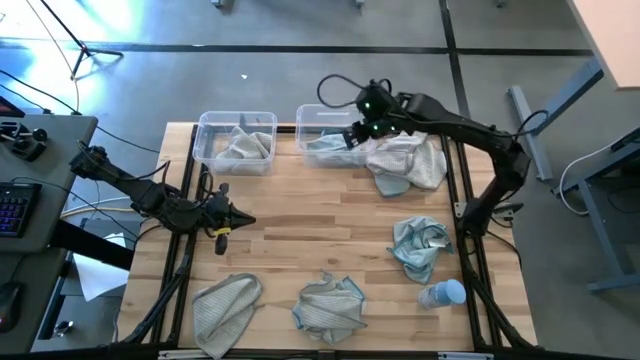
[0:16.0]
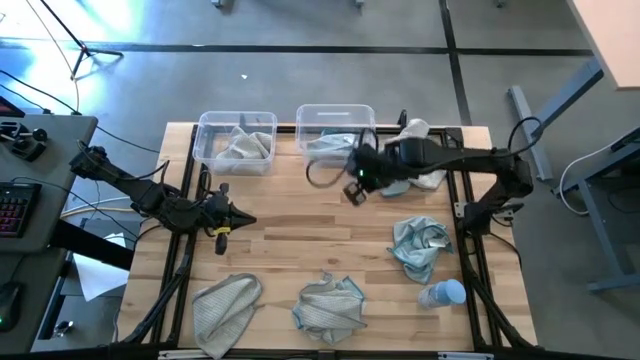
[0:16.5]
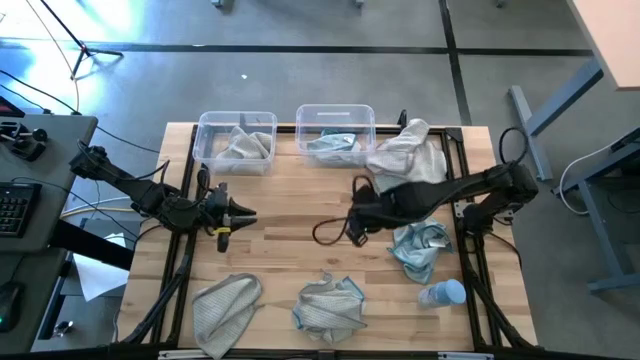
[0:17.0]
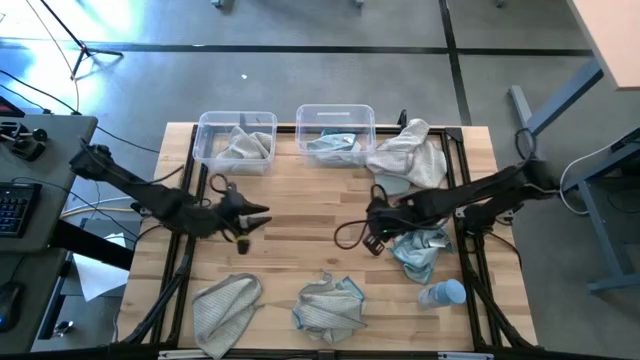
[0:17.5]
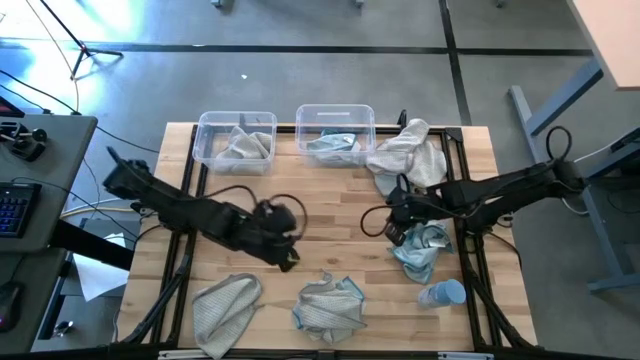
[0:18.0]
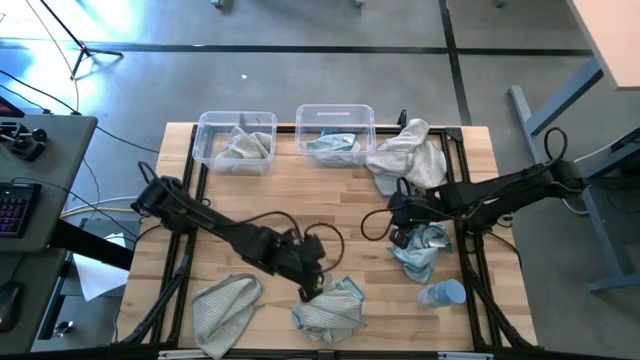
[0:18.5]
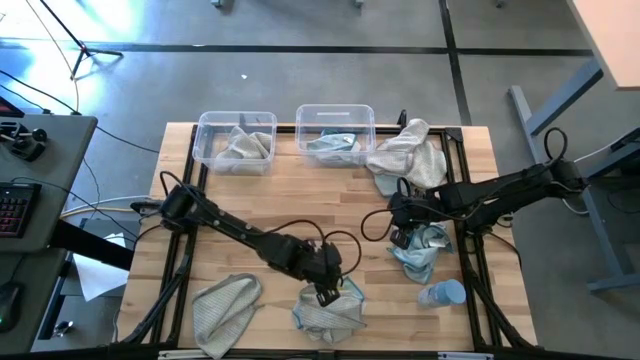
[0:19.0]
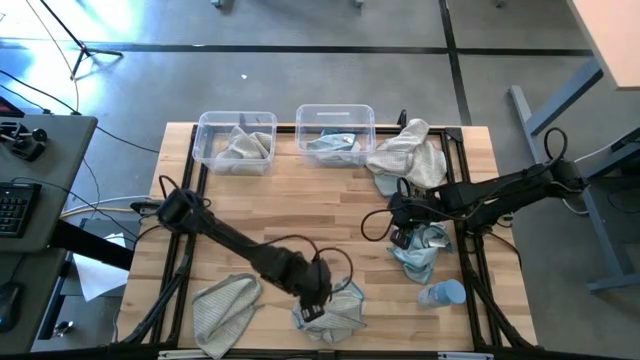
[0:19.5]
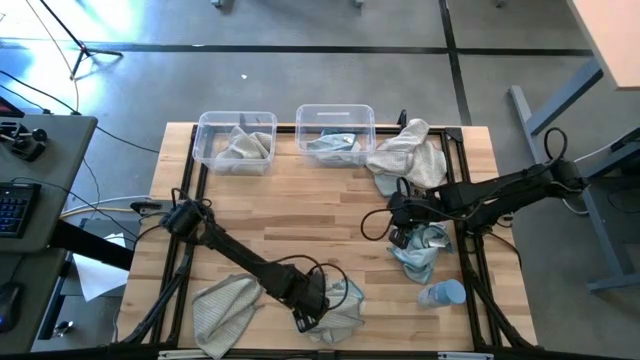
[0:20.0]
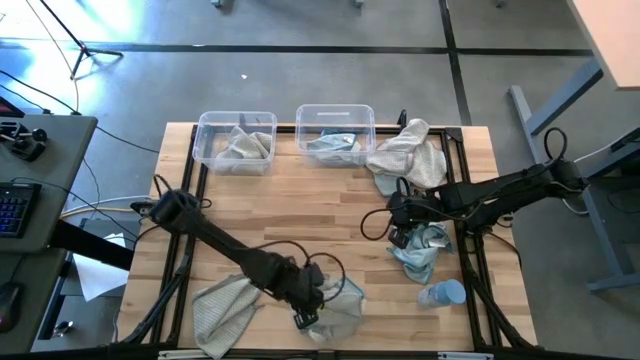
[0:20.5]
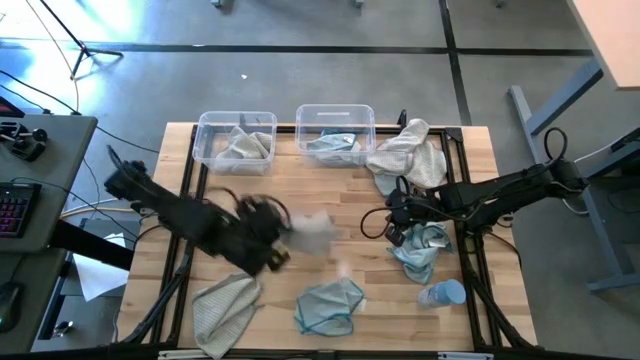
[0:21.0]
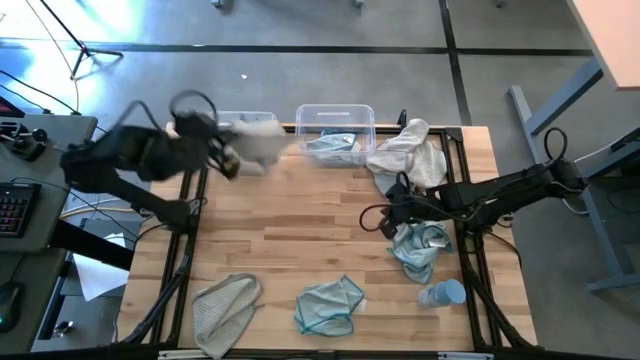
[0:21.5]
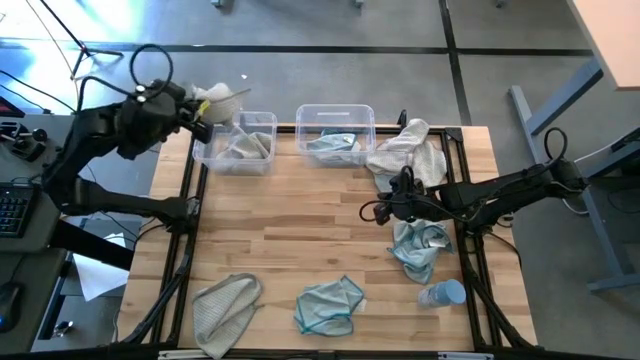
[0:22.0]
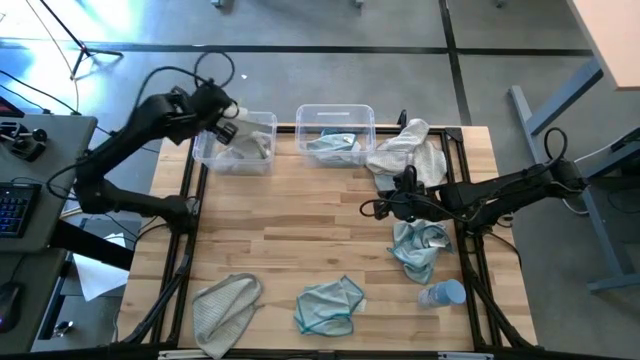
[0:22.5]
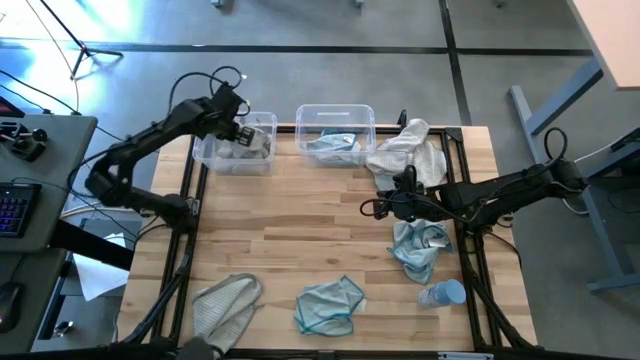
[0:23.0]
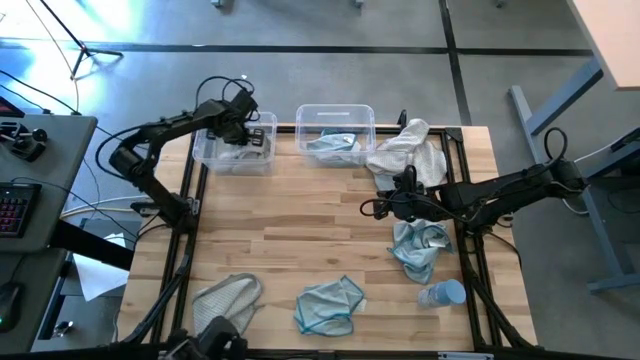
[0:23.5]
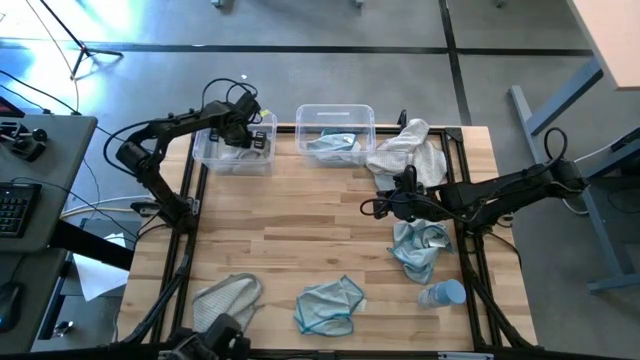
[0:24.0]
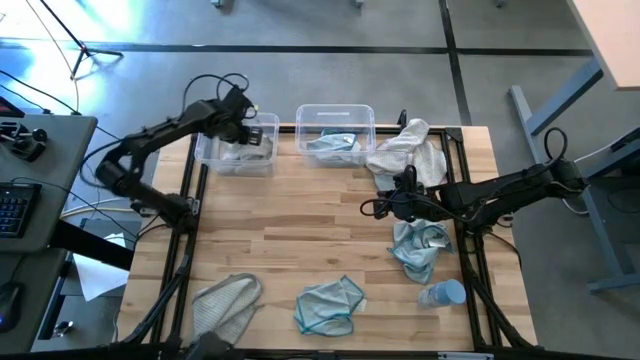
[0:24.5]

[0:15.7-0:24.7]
Task: Sort microfiber towel by color & place in baskets
Put the bottom center gray towel into the left transparent bin

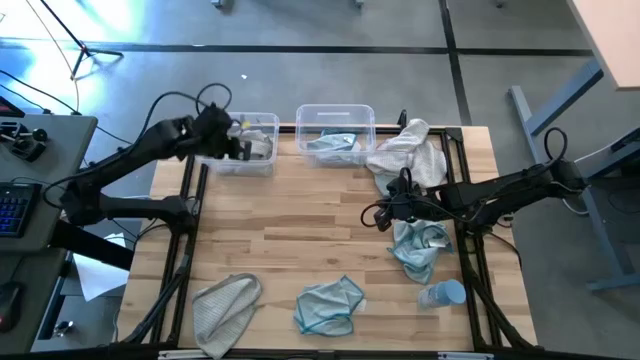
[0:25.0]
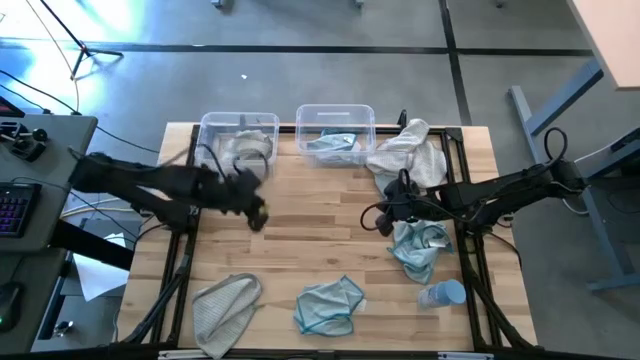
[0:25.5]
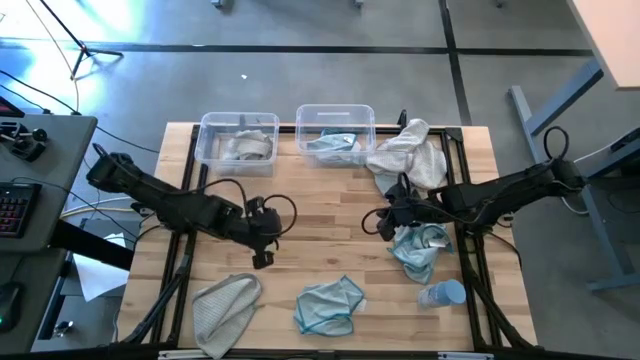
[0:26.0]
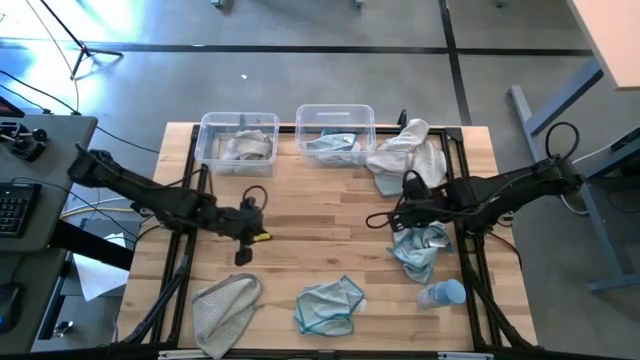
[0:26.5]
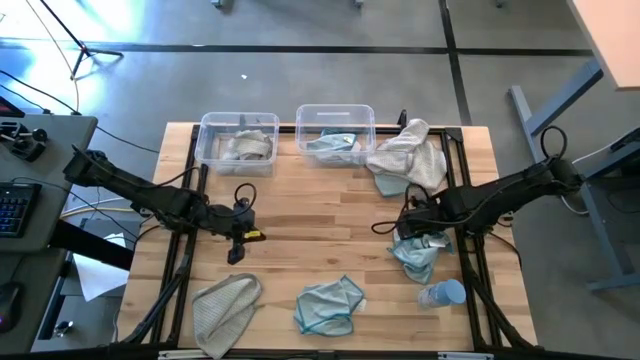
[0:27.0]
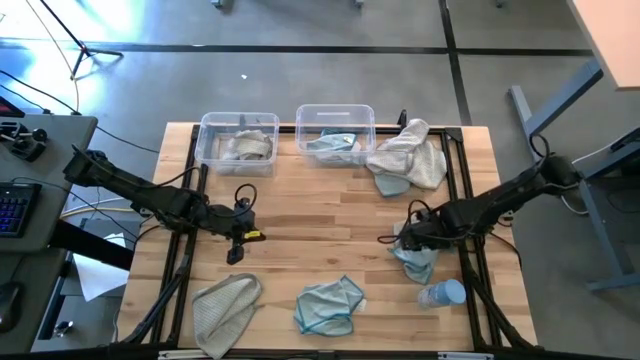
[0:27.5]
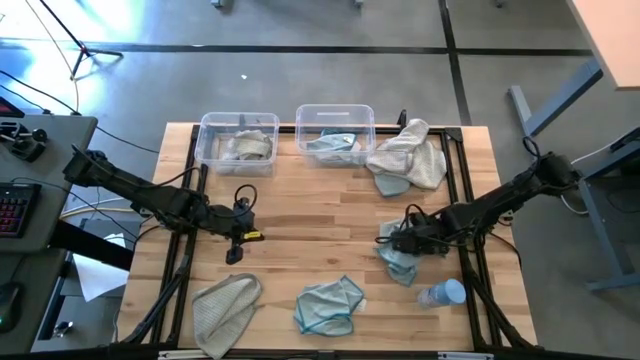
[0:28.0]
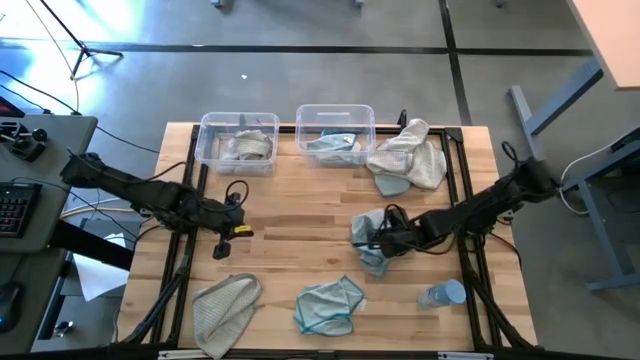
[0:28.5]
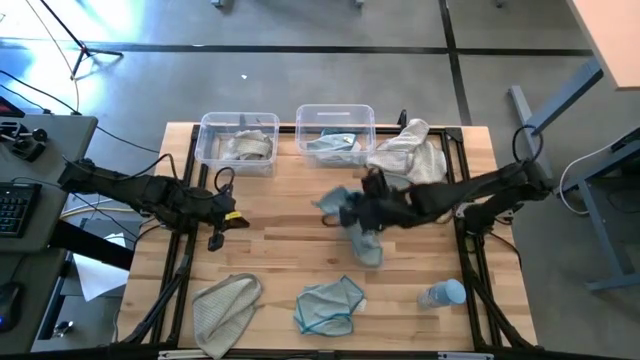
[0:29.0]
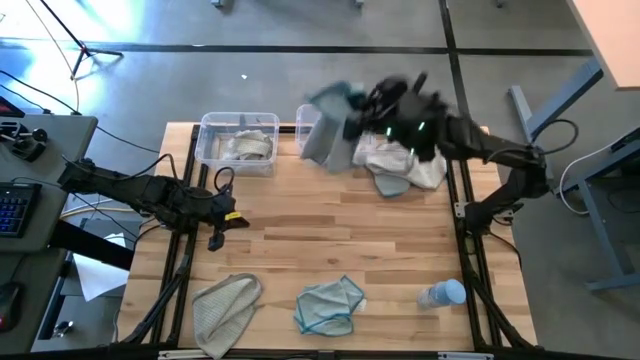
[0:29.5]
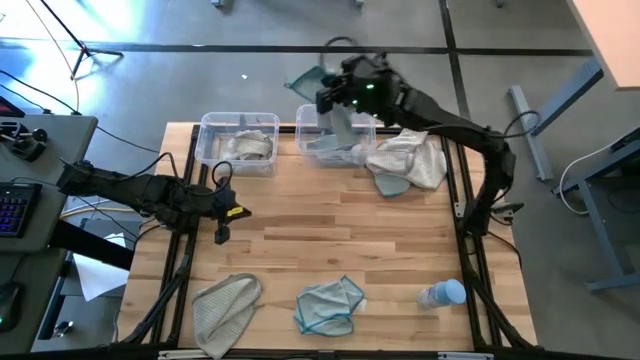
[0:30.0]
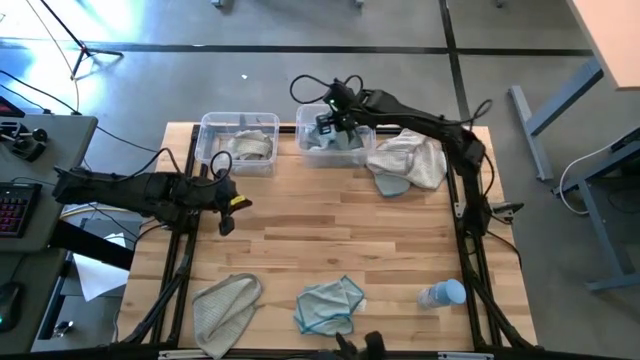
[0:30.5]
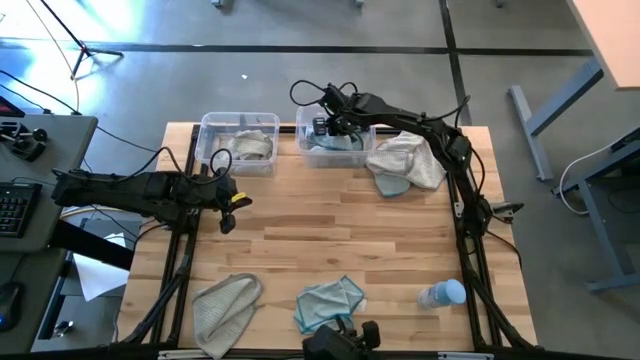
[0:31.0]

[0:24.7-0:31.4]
Put the middle right blue towel into the left transparent bin

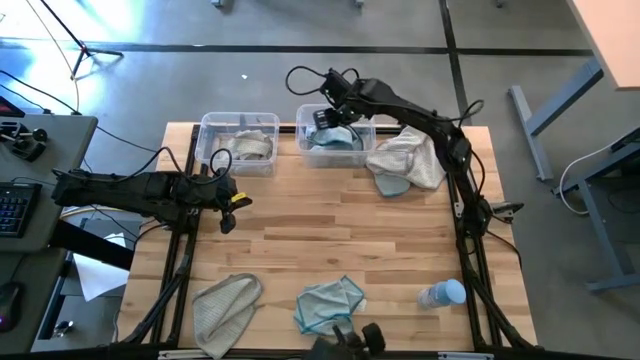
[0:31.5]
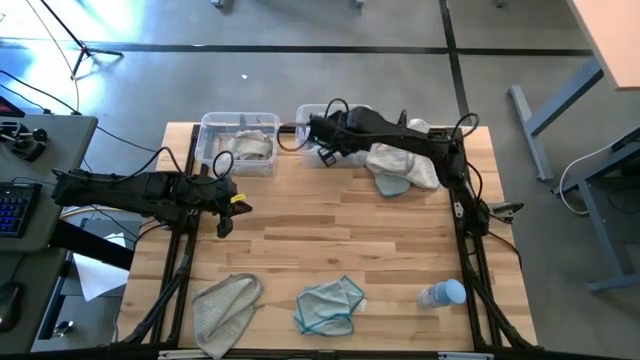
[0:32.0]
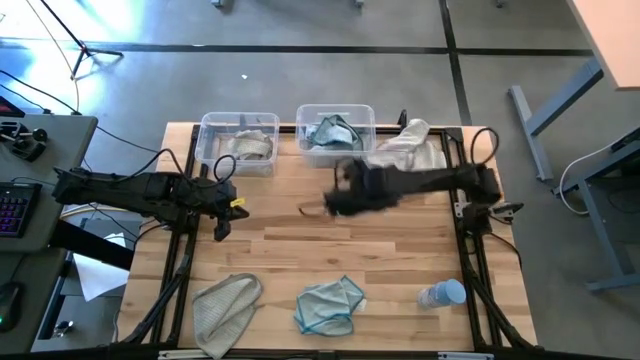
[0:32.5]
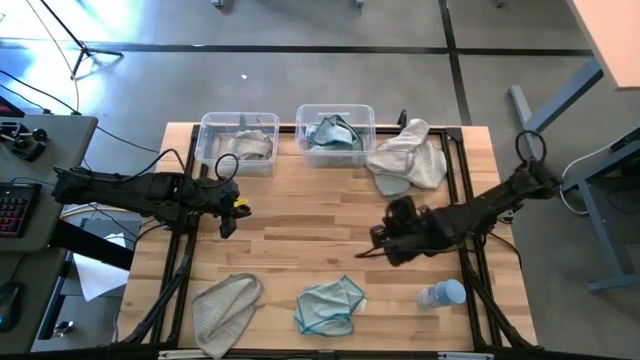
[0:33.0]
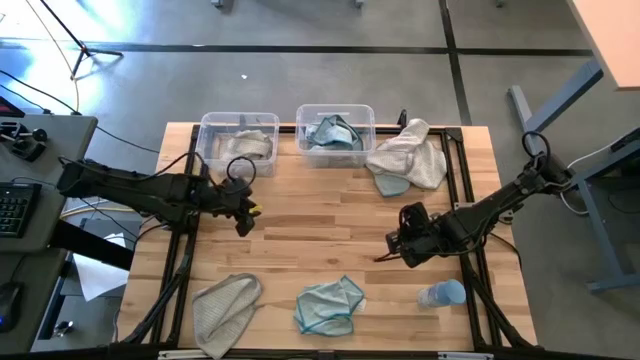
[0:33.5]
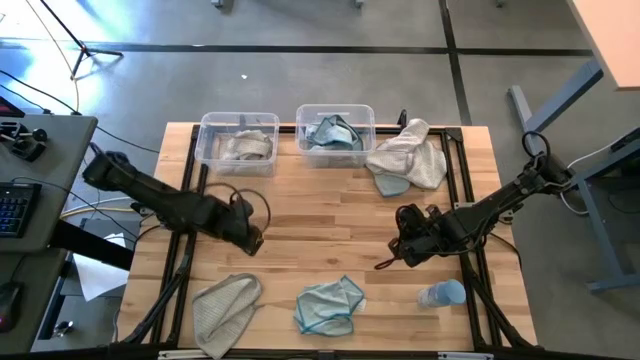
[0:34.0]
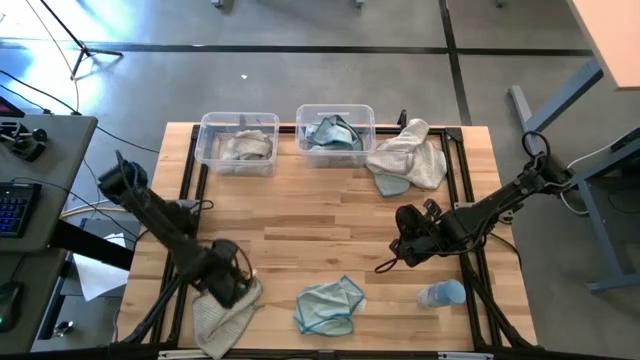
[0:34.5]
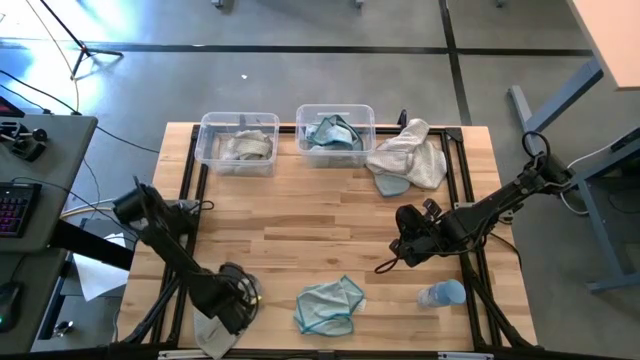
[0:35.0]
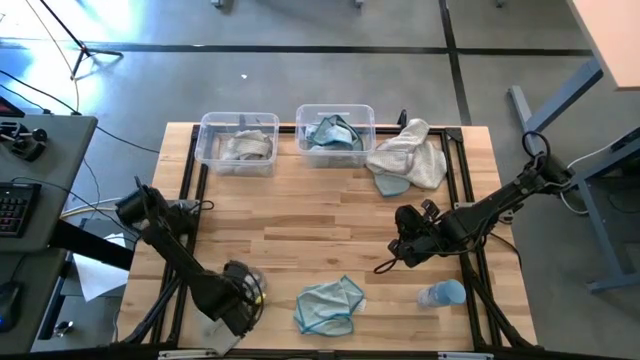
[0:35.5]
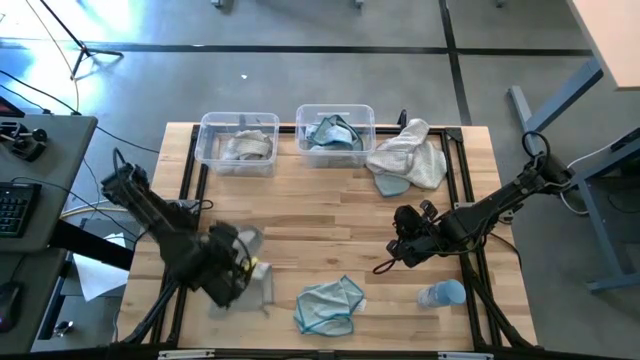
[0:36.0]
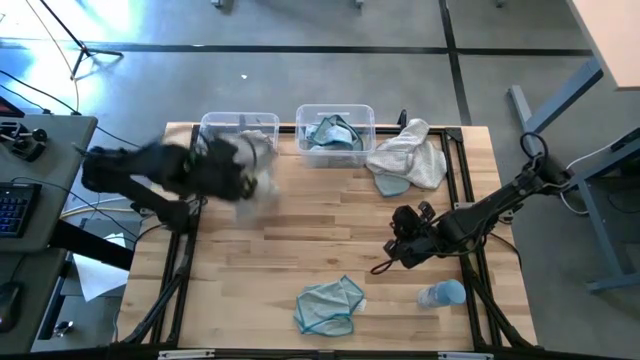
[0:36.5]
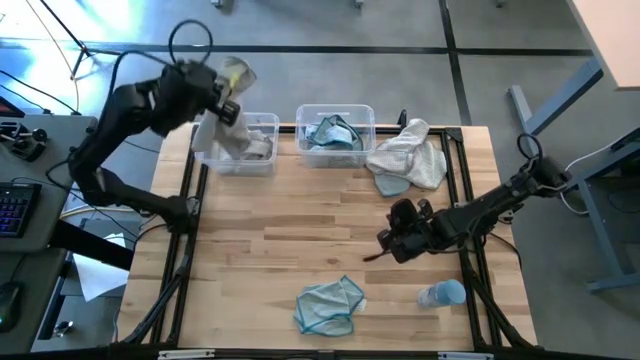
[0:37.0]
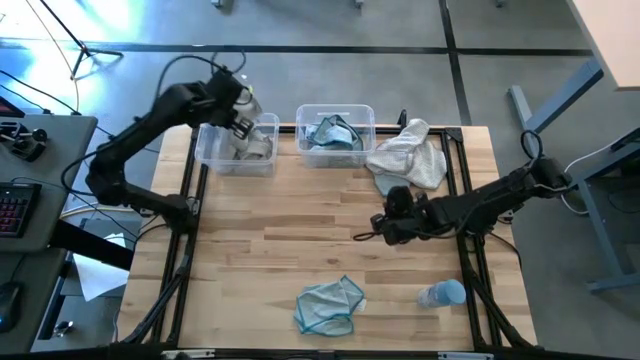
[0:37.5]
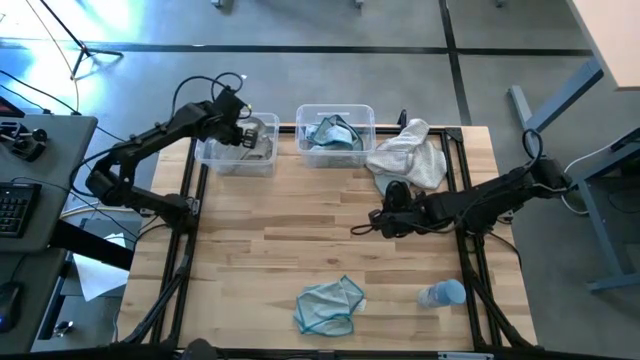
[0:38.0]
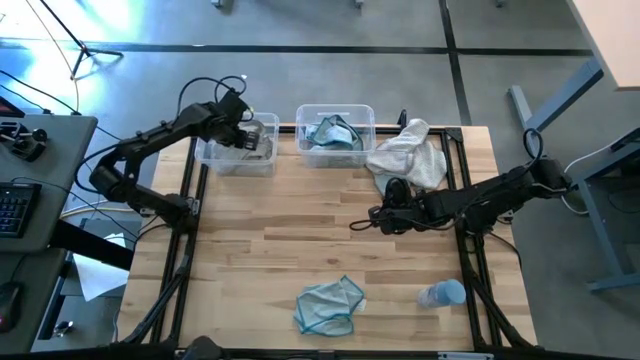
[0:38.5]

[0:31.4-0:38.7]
Put the bottom gray towel into the left transparent bin
